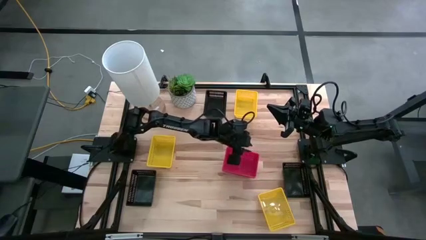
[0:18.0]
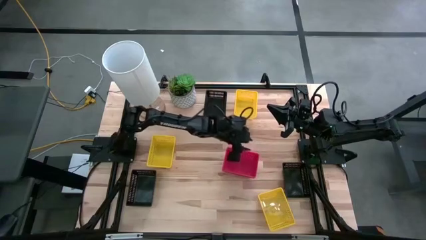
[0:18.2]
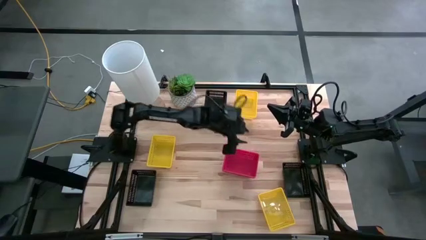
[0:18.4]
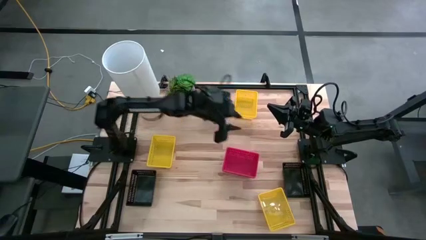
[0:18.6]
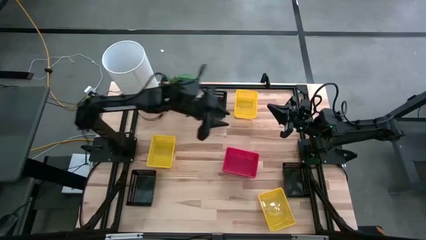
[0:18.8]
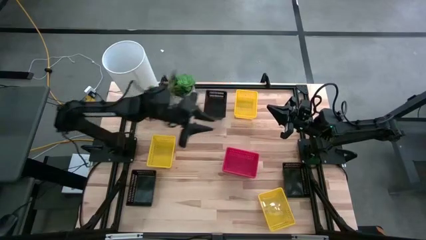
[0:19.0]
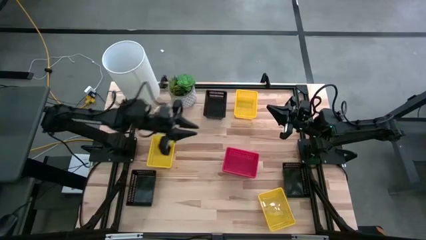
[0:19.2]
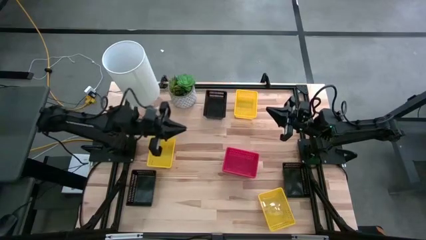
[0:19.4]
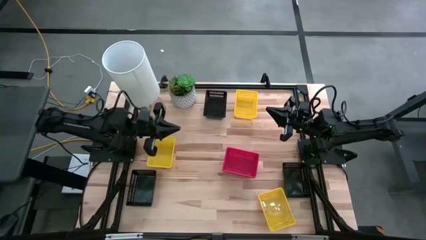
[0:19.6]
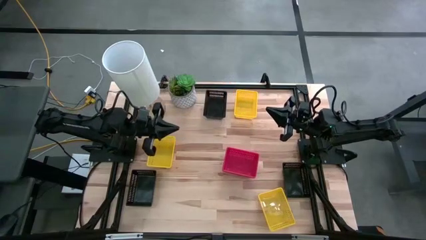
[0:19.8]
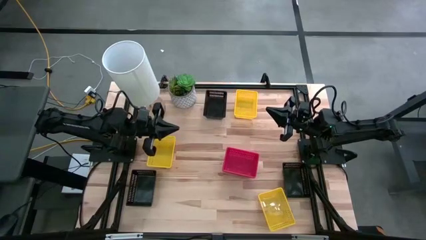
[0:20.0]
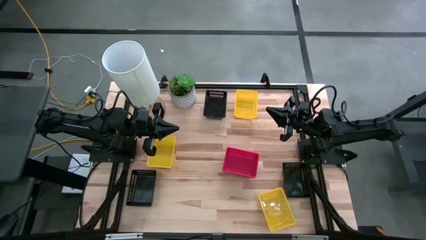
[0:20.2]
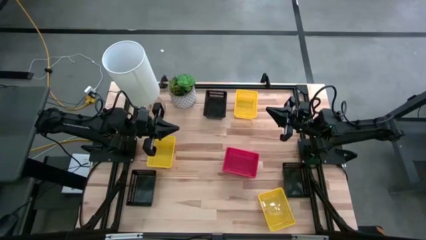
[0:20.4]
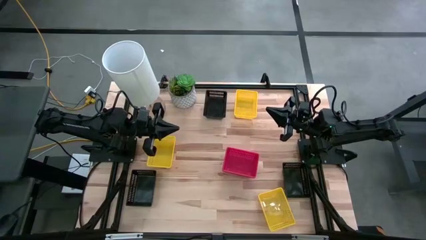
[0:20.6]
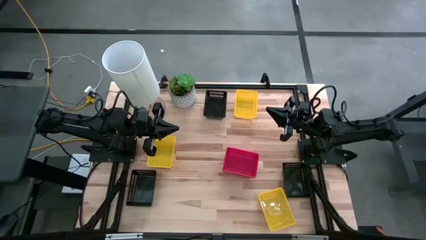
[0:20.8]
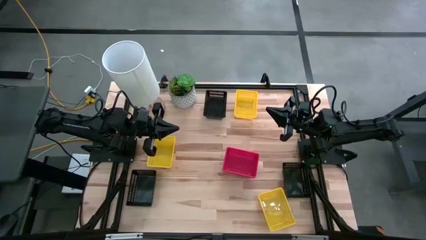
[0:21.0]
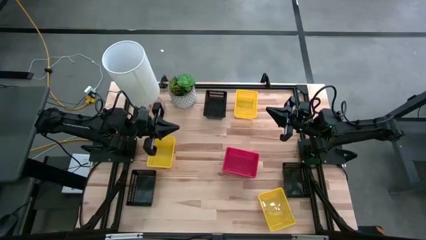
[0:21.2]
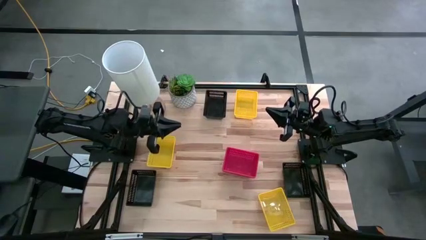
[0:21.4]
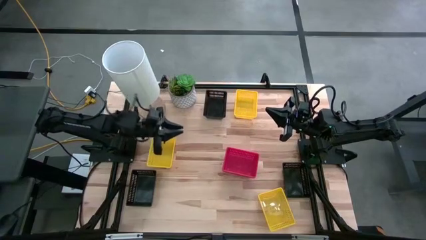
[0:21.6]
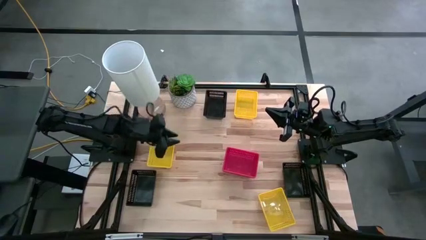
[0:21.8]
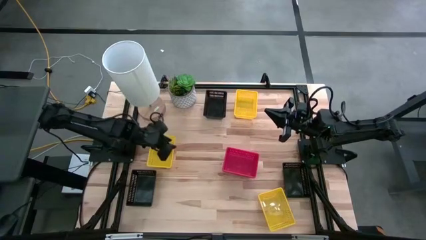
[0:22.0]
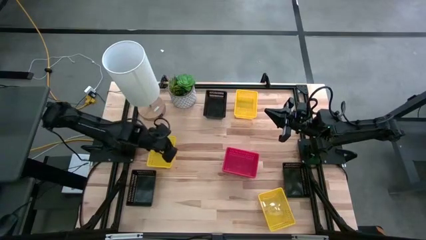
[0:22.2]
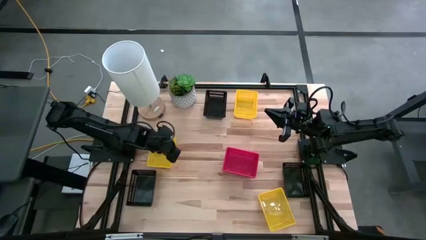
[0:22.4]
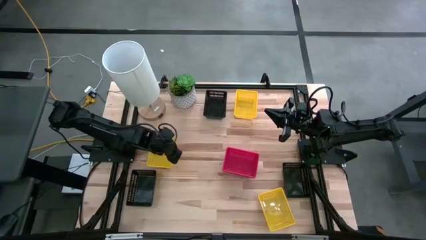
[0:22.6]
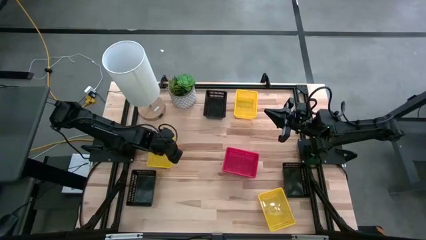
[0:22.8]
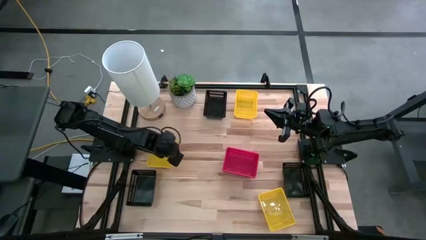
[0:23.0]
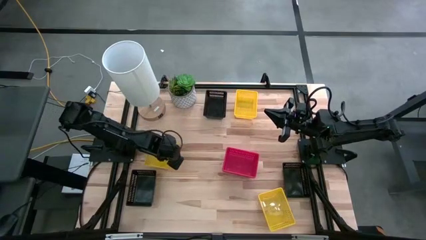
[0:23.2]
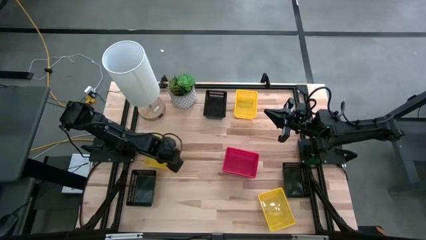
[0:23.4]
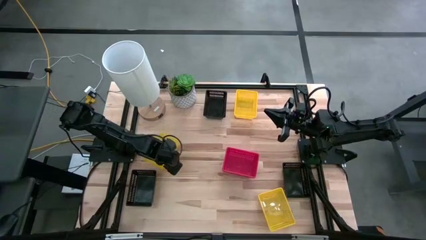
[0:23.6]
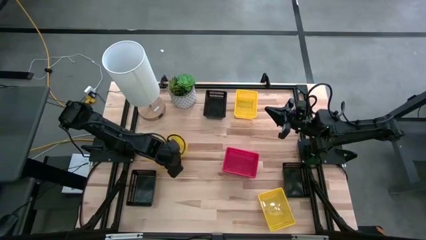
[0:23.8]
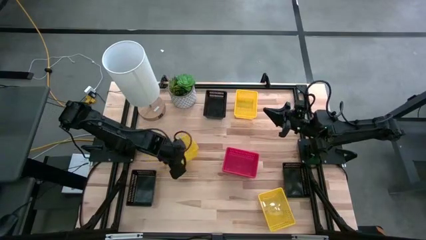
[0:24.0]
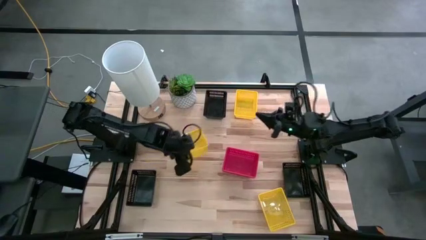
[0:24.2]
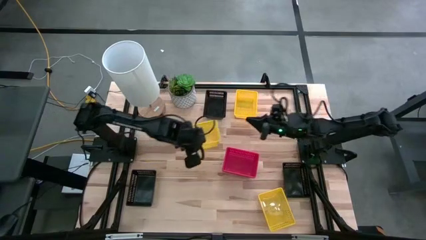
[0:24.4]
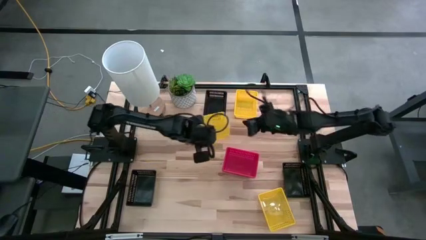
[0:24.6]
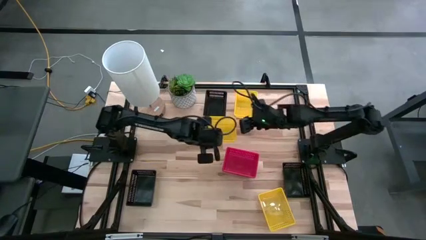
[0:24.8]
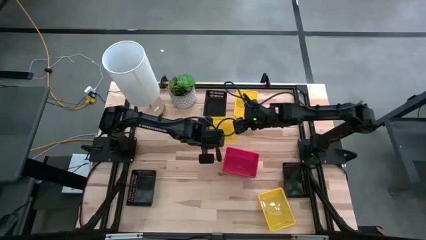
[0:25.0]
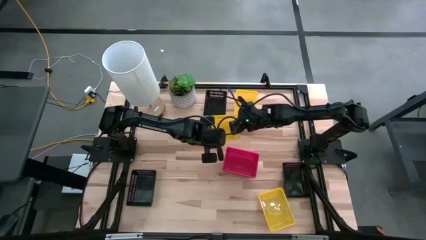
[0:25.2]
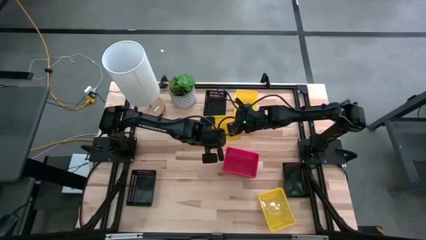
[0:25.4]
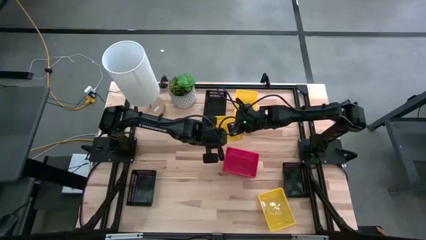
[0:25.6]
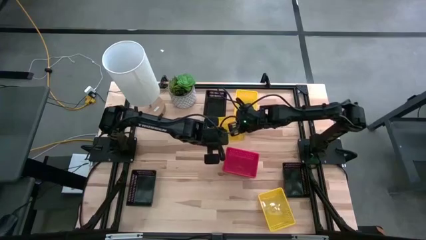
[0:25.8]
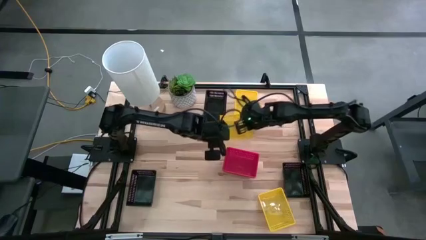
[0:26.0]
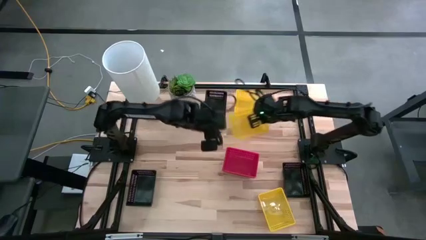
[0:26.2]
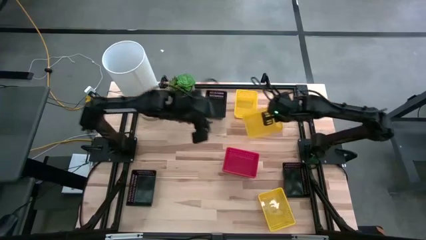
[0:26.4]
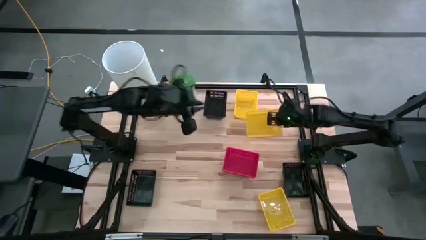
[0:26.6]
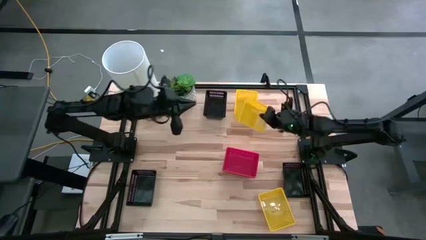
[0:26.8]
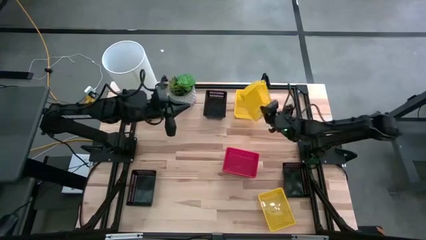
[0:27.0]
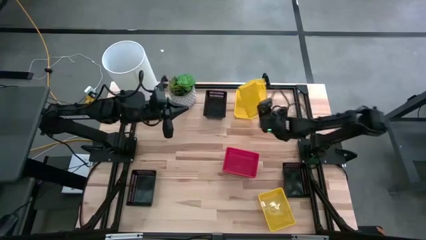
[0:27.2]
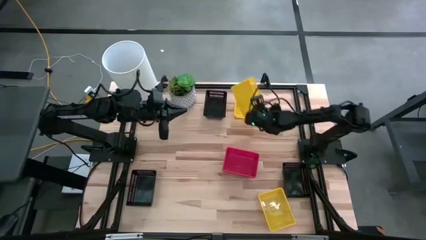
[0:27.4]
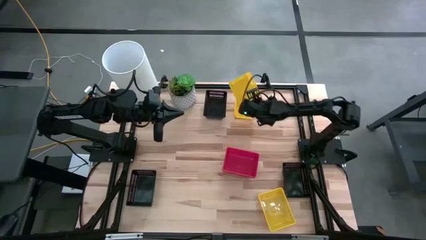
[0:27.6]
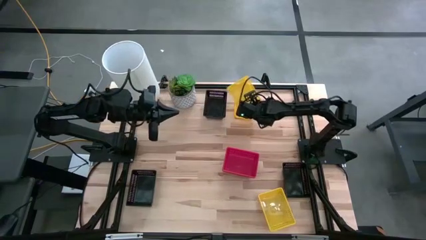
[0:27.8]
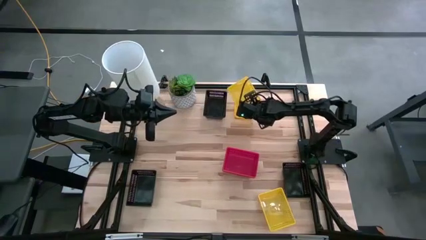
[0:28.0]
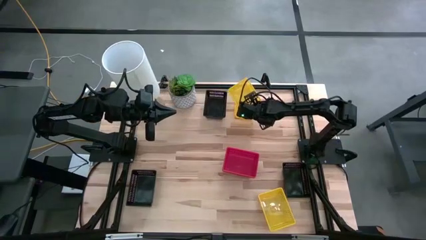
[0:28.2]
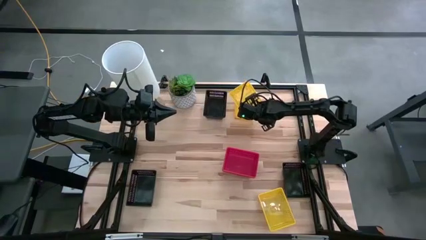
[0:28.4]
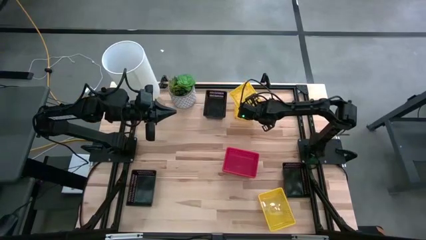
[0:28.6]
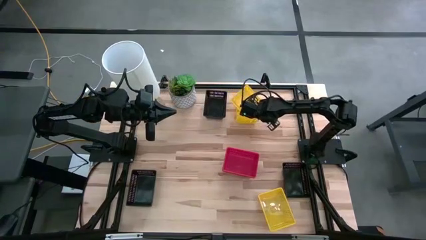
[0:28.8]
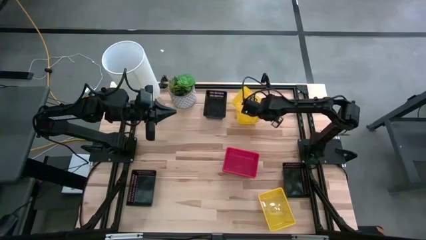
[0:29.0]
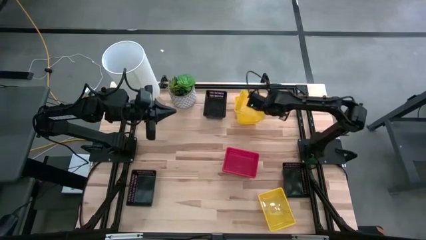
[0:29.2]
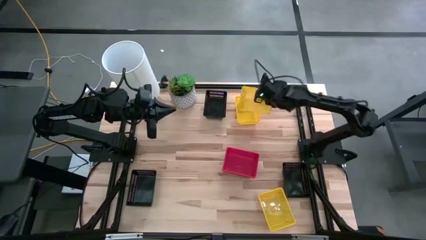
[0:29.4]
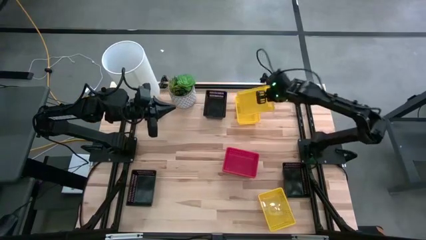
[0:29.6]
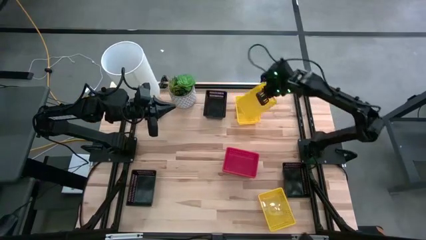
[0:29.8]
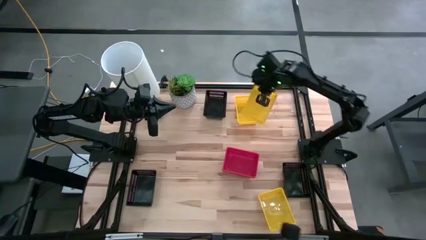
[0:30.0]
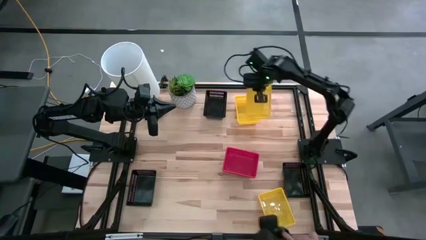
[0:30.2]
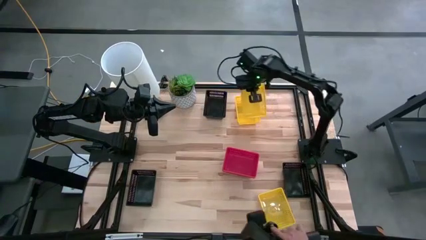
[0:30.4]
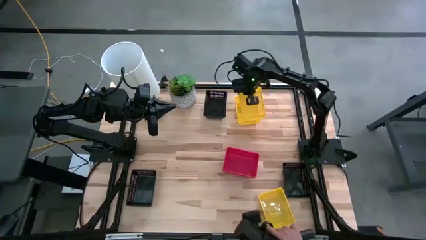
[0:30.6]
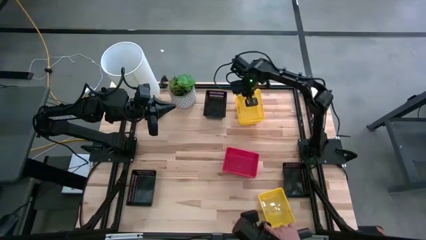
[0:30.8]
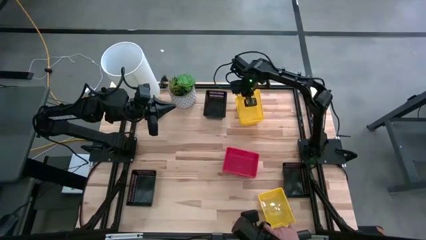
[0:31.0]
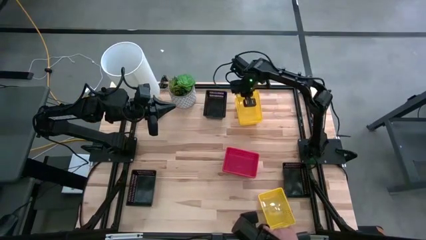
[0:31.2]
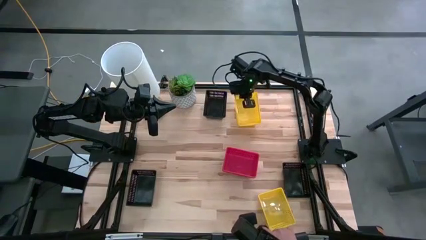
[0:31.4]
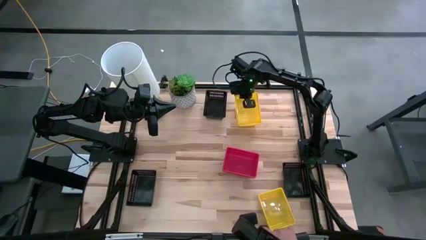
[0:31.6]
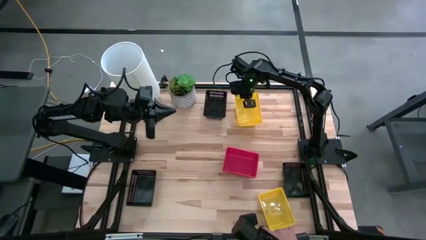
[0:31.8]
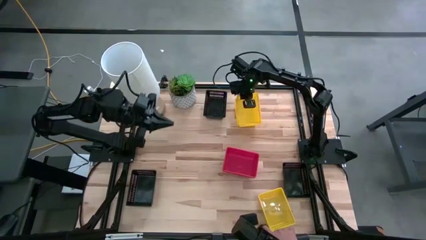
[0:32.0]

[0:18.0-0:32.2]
Stack the left yellow bin on top of the top yellow bin on the table

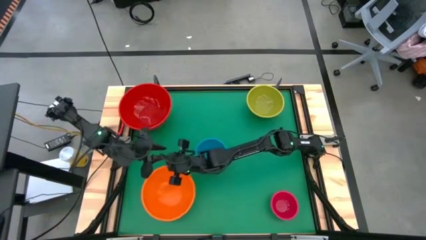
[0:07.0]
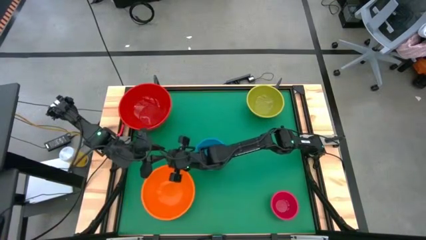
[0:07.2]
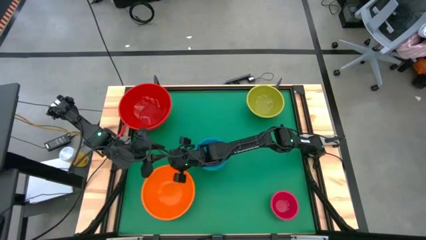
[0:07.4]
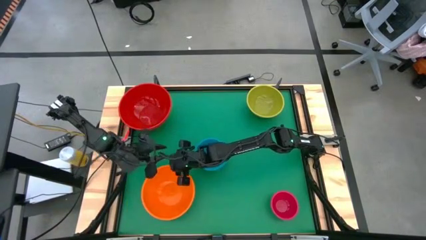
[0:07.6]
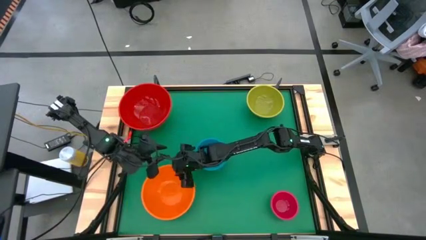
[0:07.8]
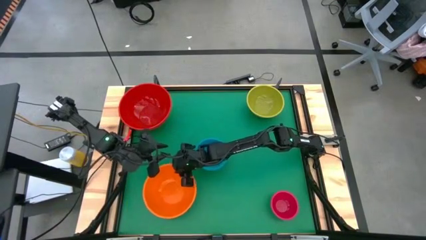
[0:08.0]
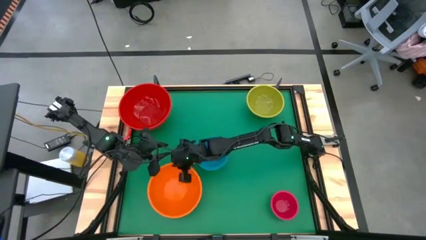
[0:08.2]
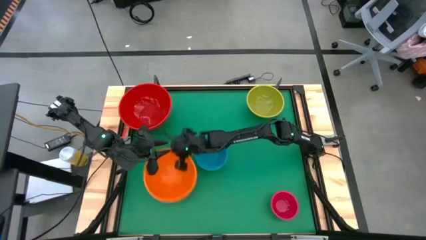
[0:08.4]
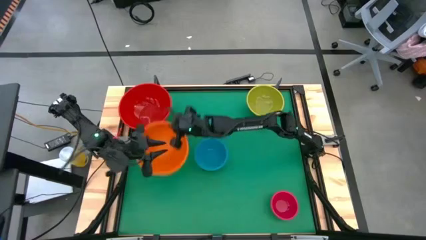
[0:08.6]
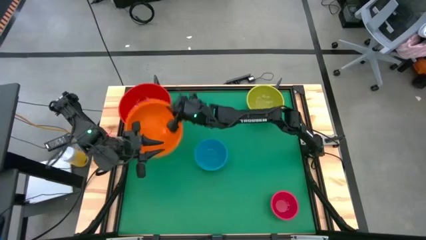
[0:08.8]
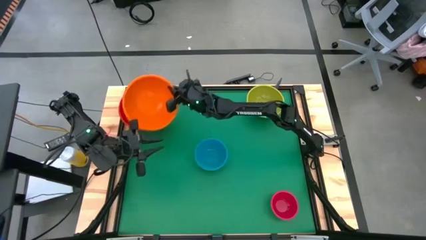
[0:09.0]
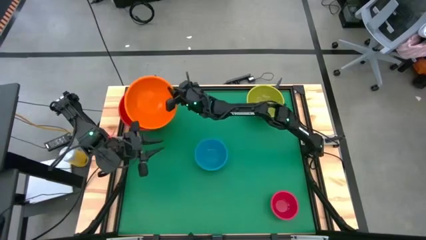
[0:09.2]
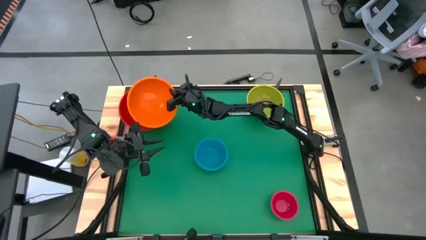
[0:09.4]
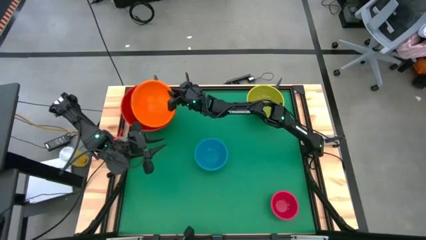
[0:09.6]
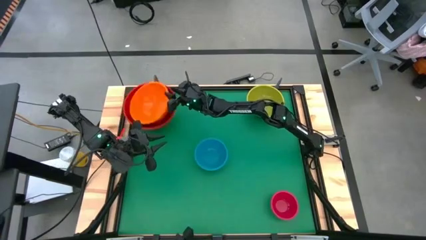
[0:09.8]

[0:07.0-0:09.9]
Stack the orange bowl into the large red bowl
